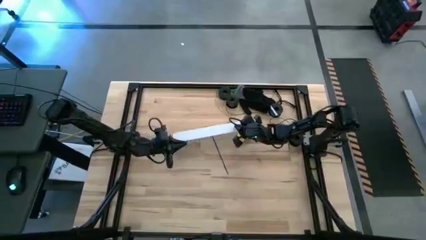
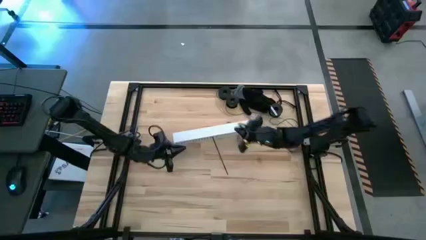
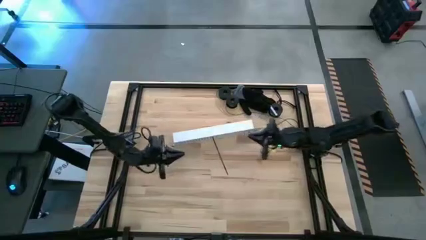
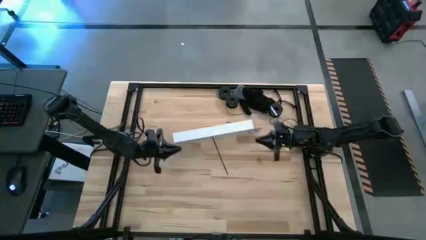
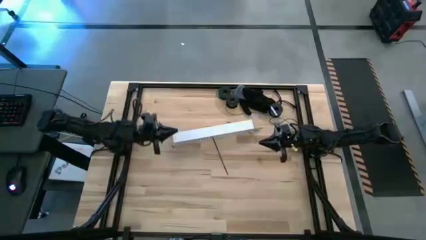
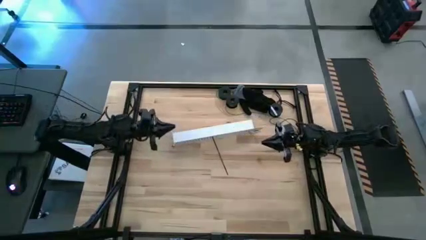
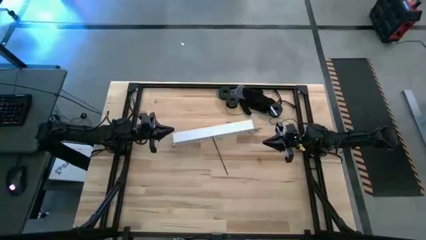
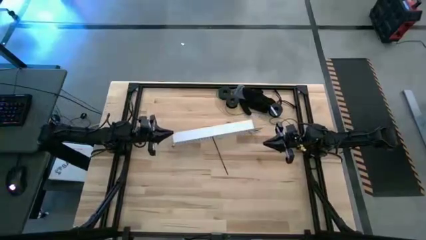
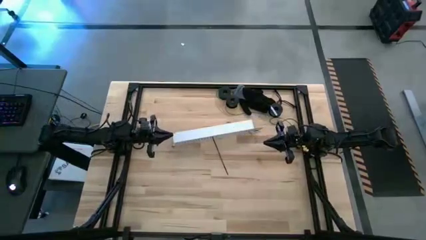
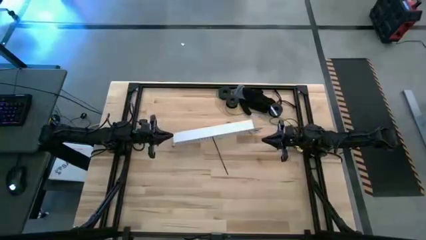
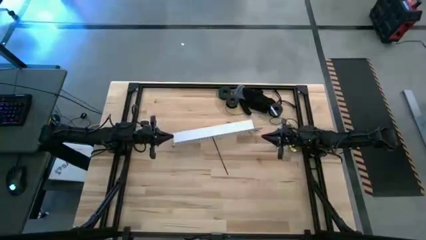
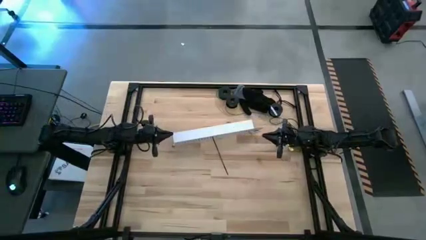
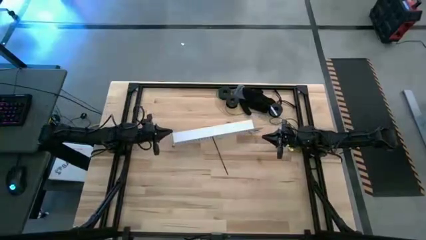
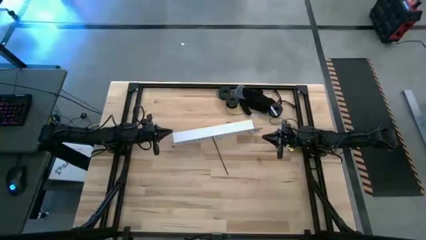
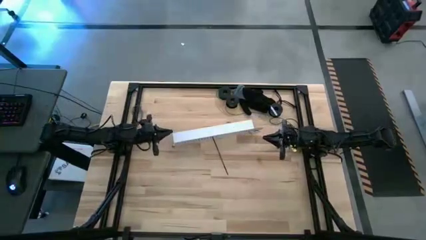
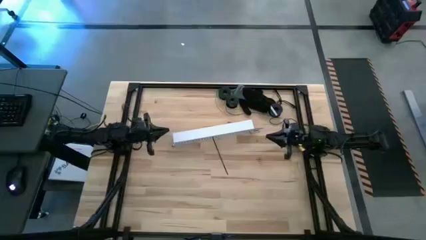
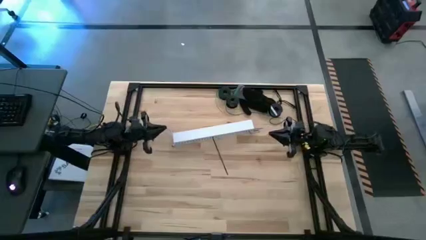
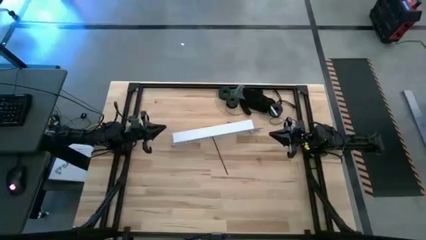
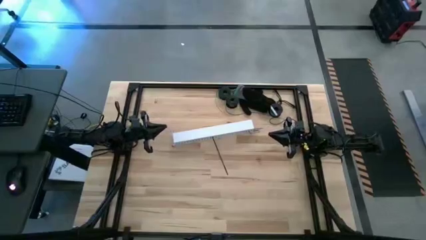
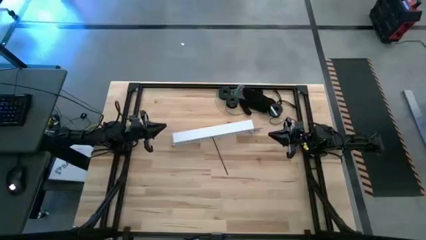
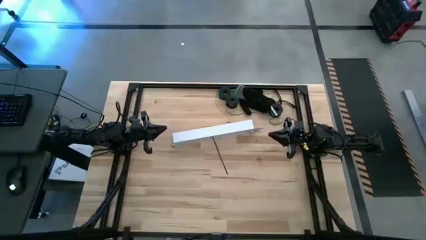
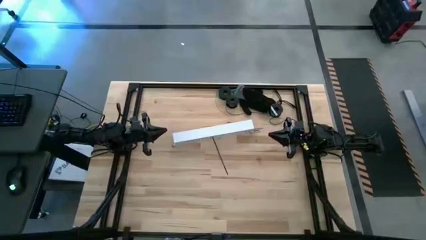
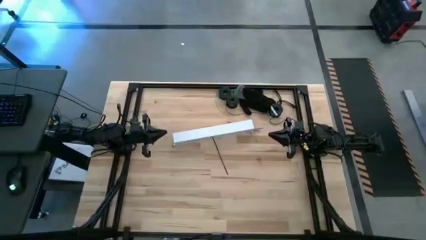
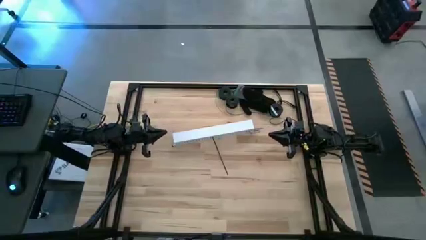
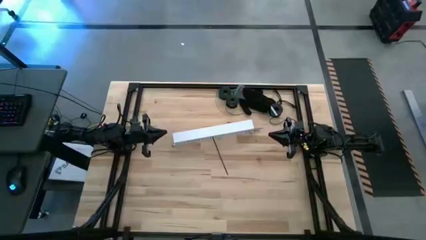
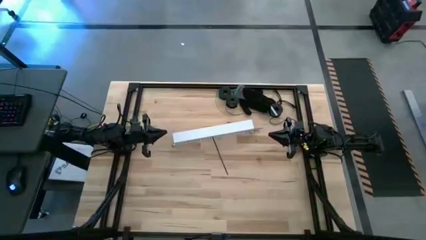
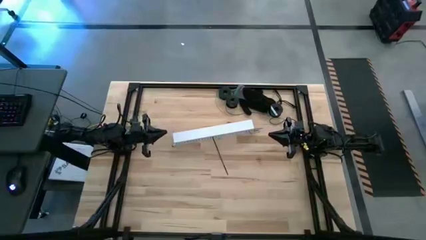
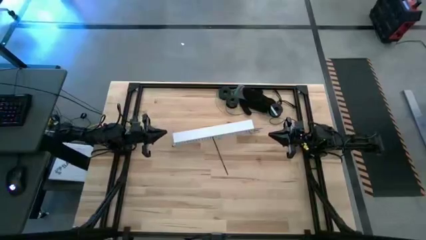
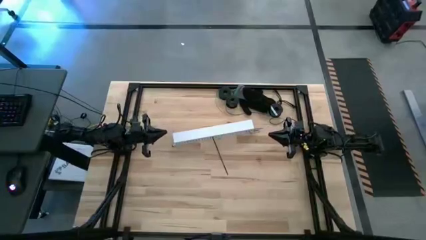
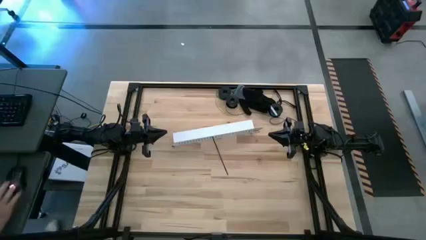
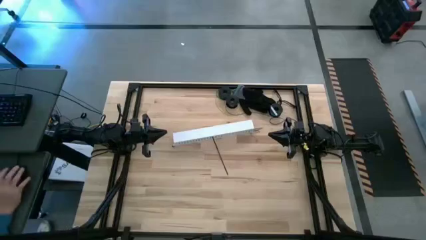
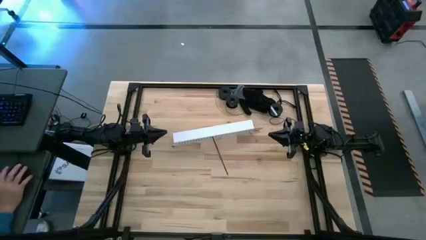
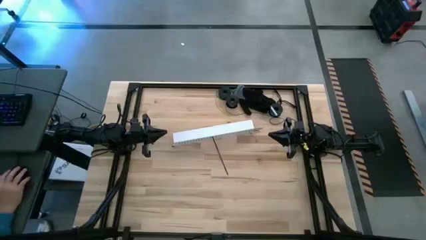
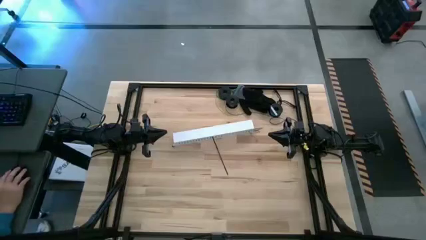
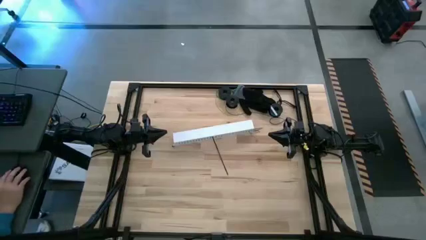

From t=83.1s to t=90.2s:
Task: Ziptie cables
Return to Home Position

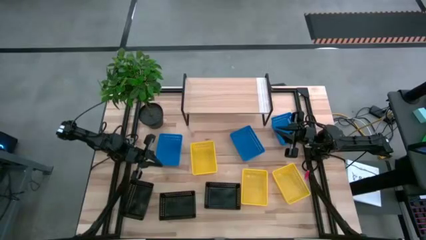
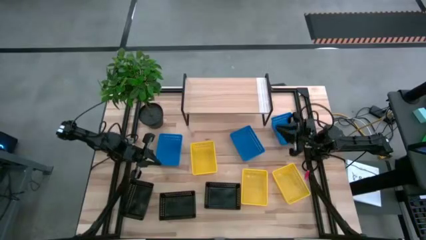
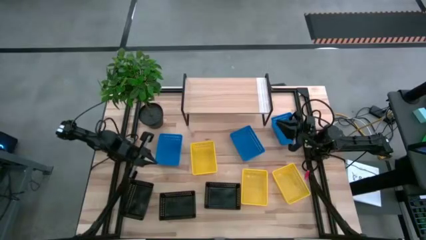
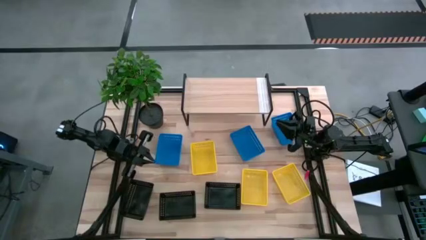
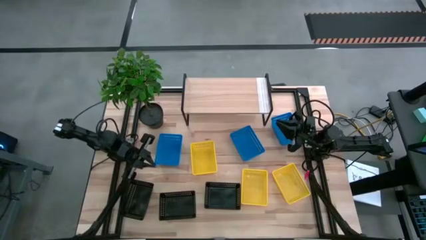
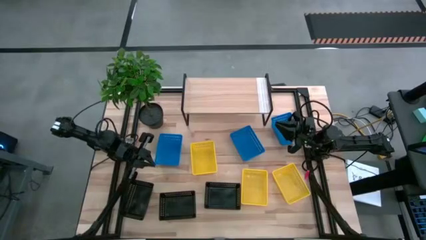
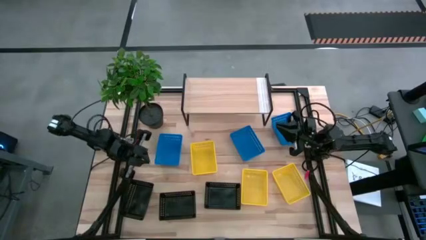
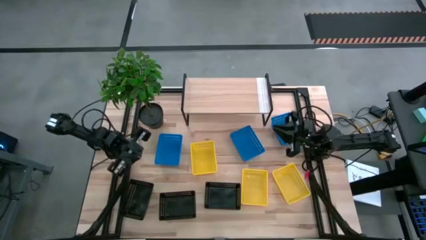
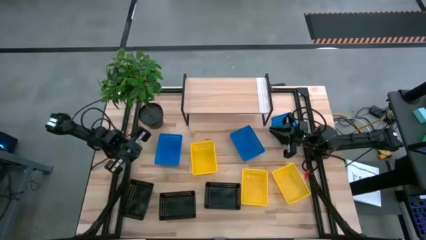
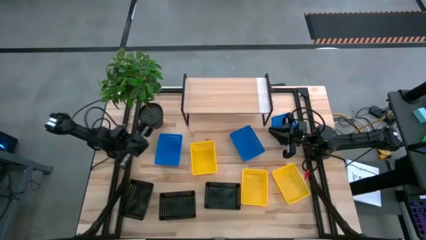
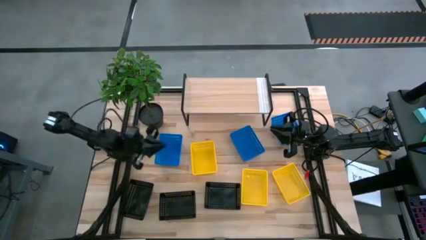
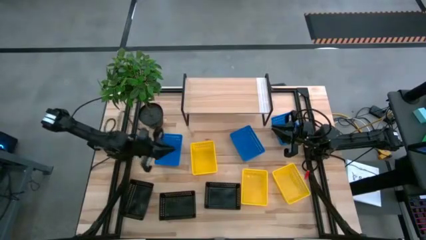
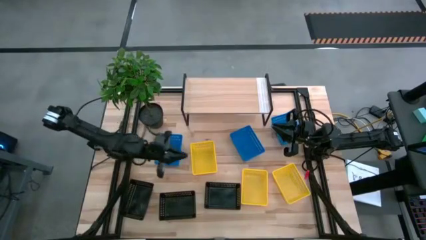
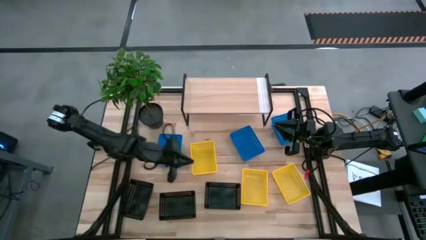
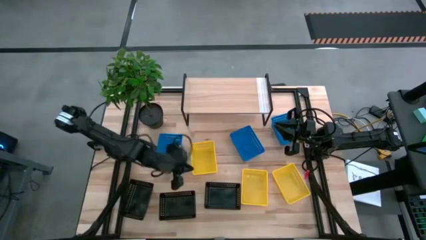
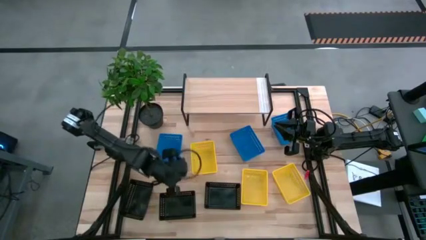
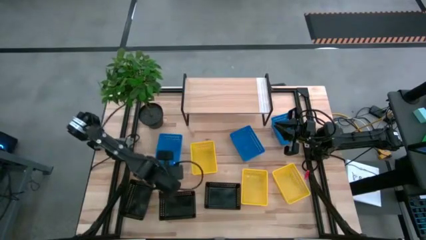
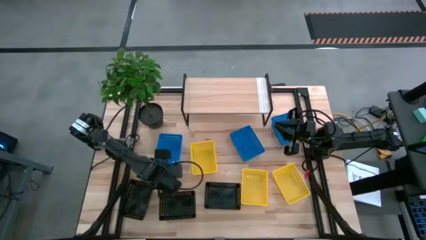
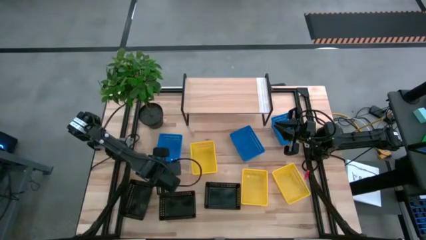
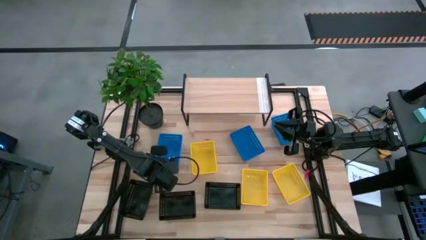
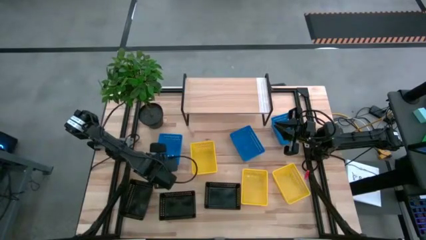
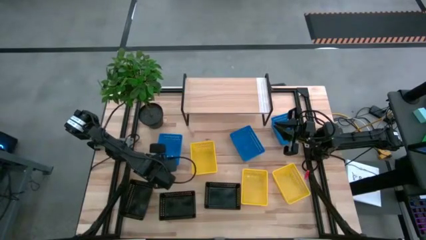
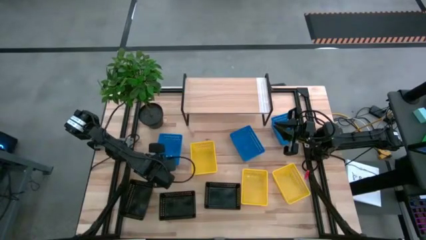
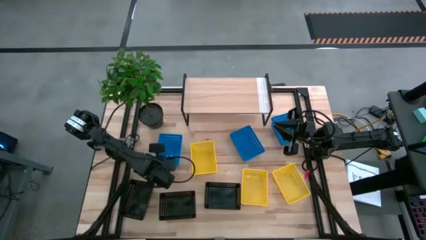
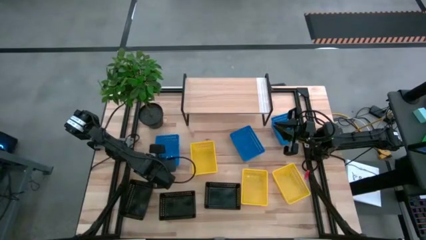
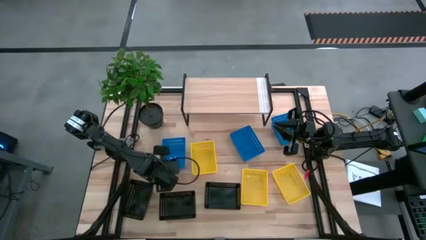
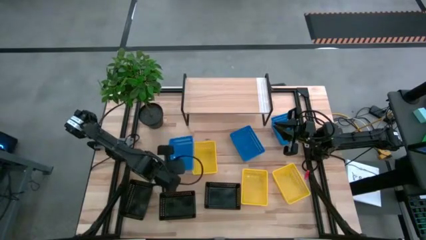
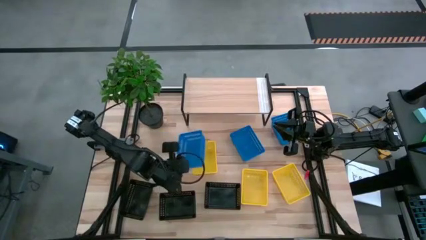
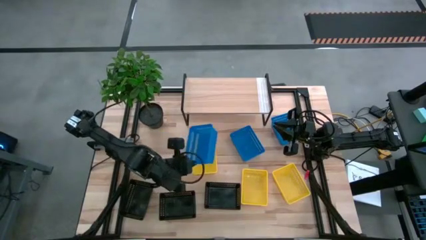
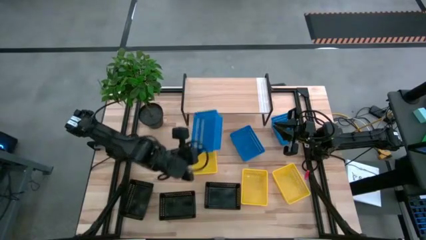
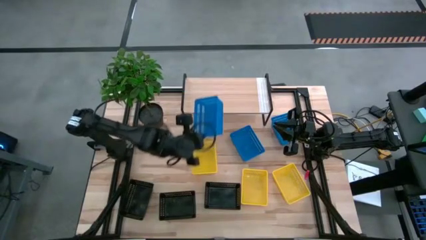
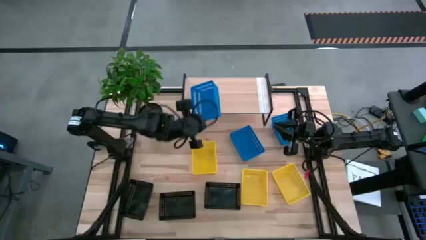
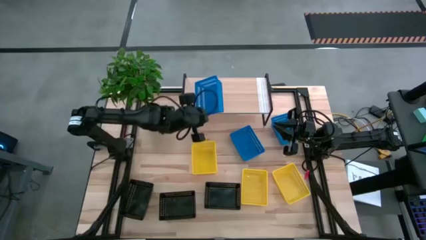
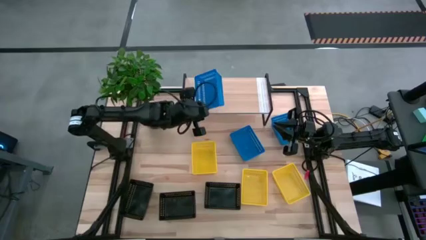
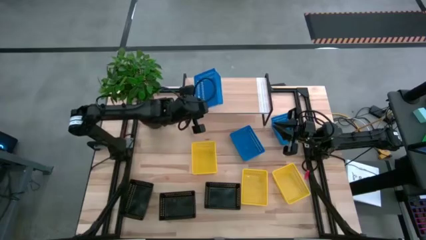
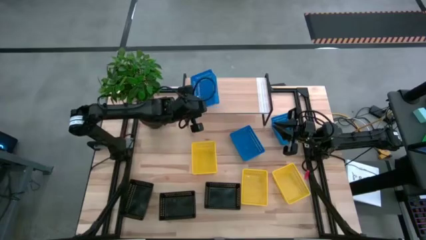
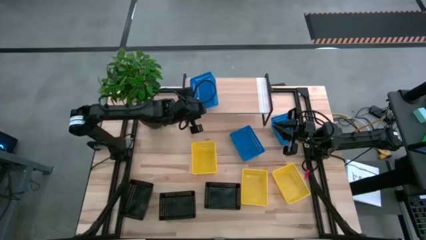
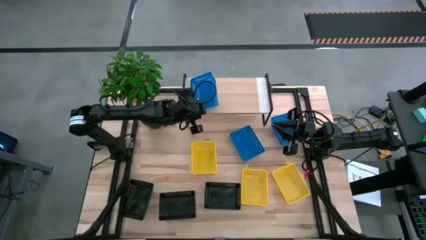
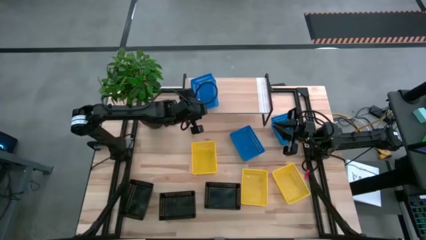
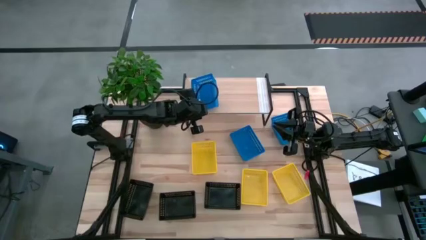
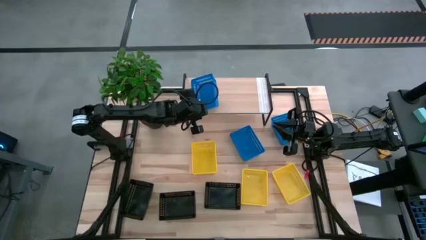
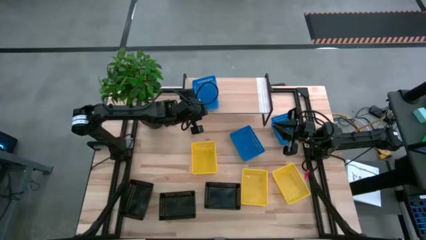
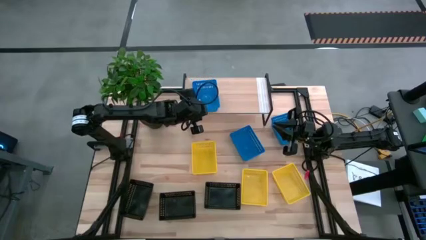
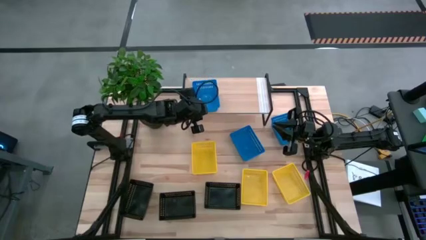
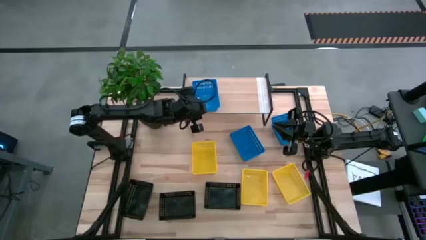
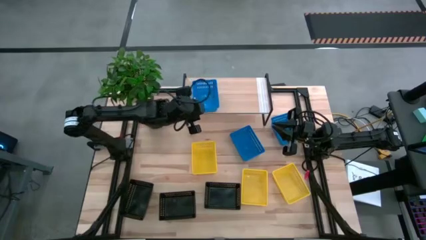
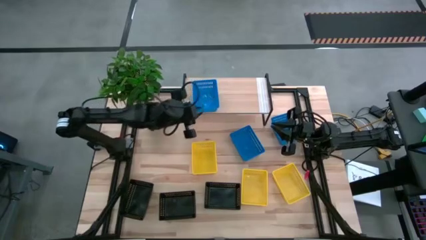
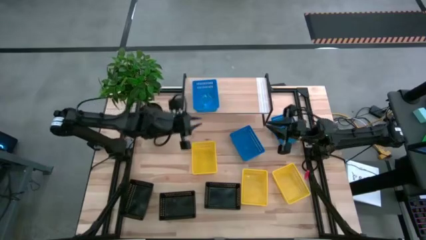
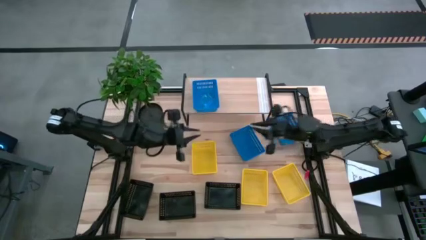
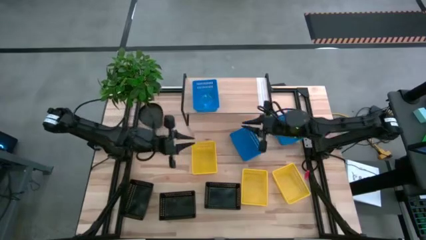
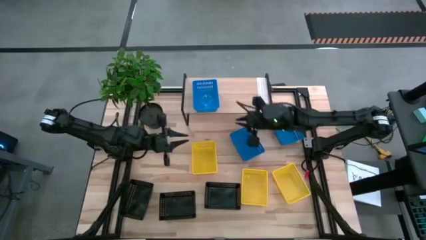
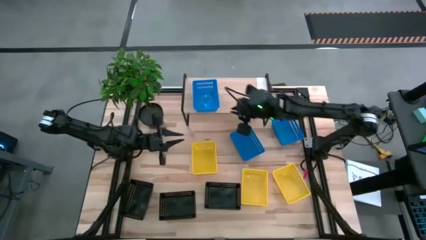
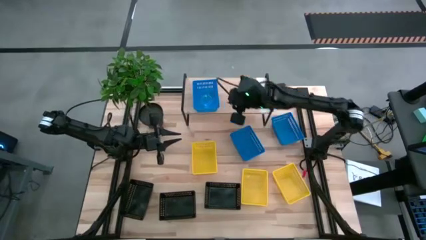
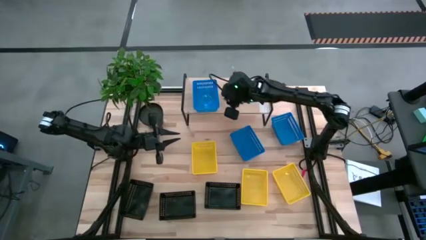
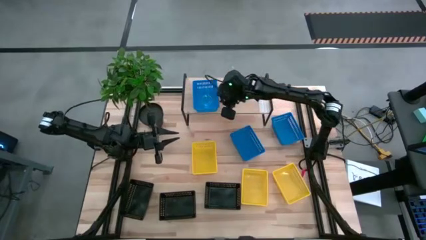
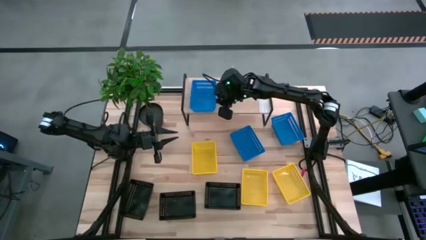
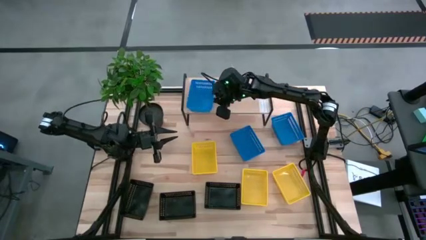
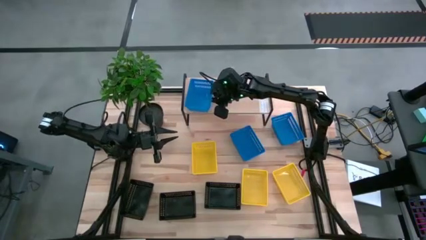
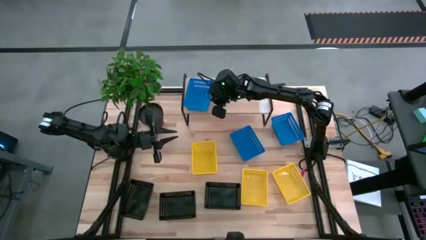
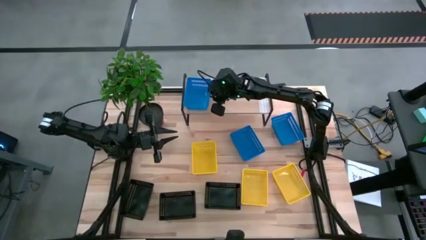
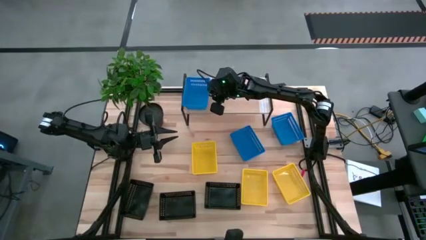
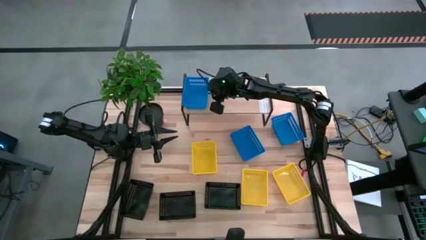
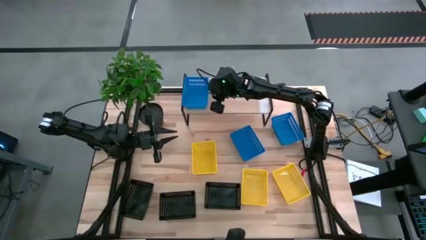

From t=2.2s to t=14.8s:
Task: Stack baskets on shelf by color
Put the left blue bin on the shelf
